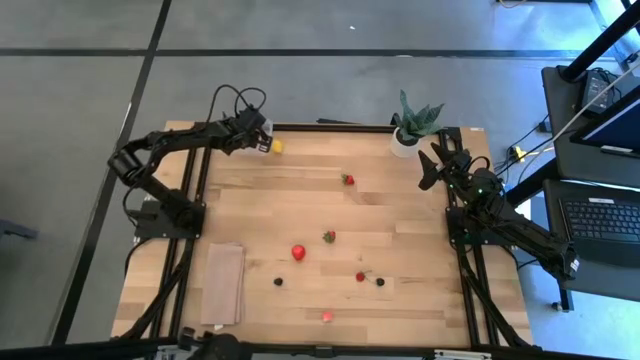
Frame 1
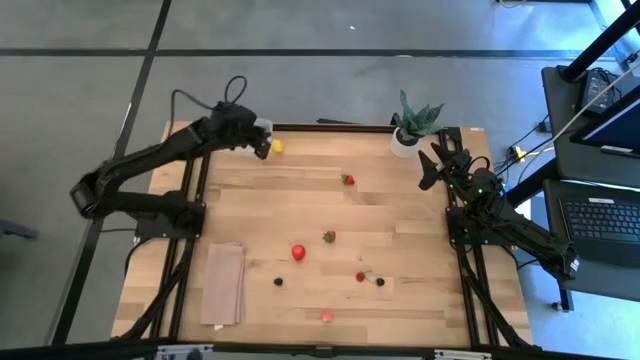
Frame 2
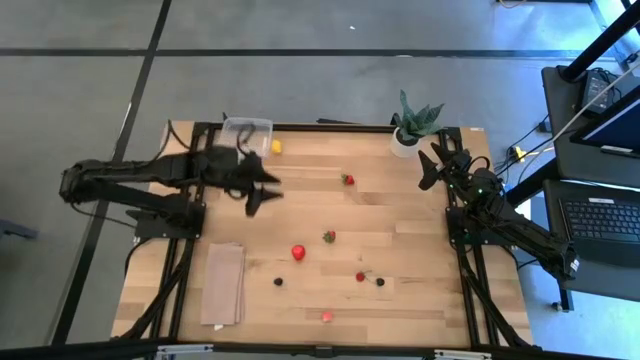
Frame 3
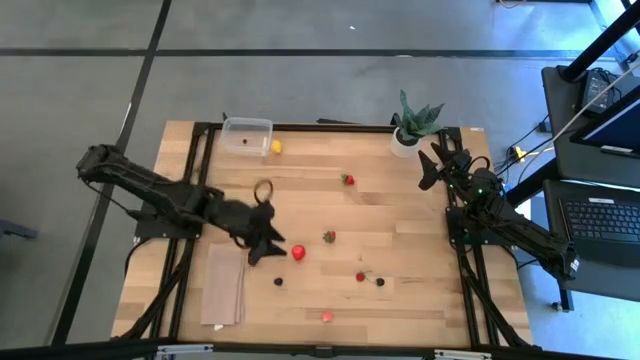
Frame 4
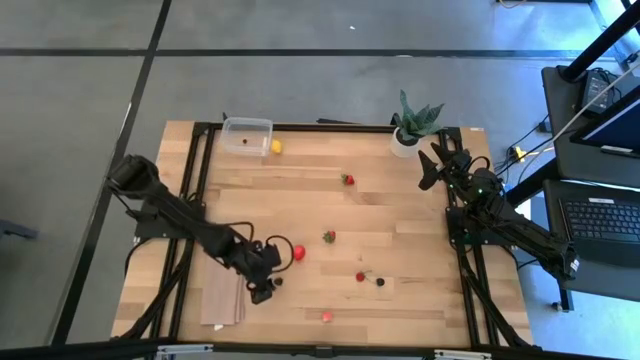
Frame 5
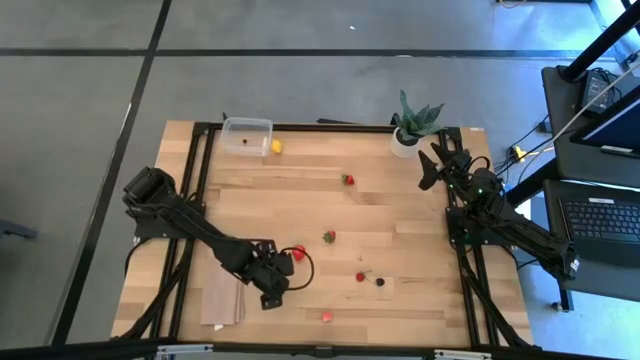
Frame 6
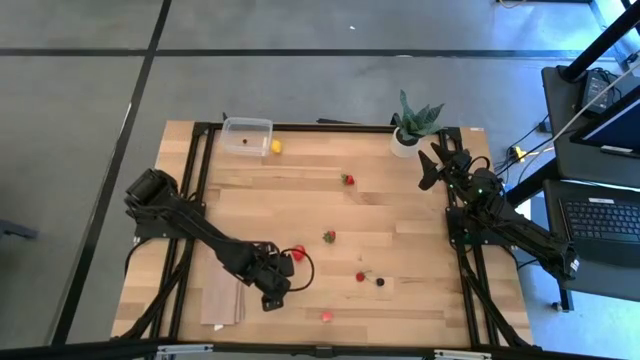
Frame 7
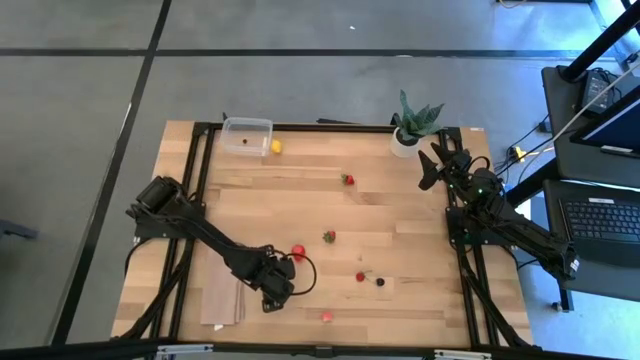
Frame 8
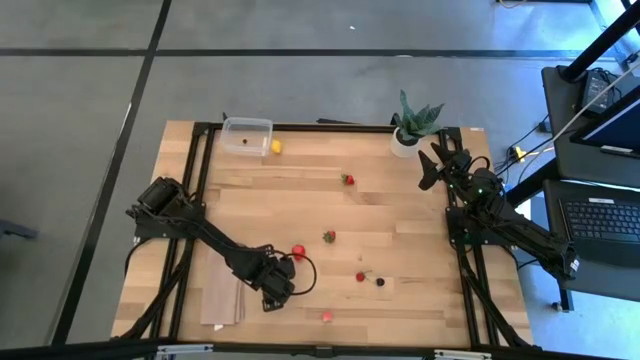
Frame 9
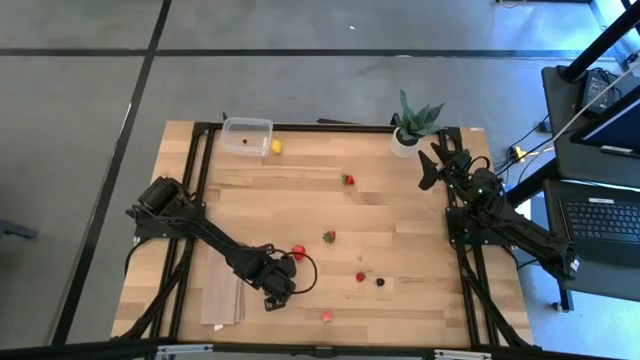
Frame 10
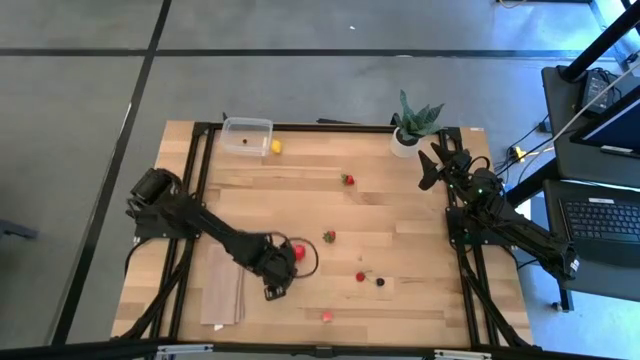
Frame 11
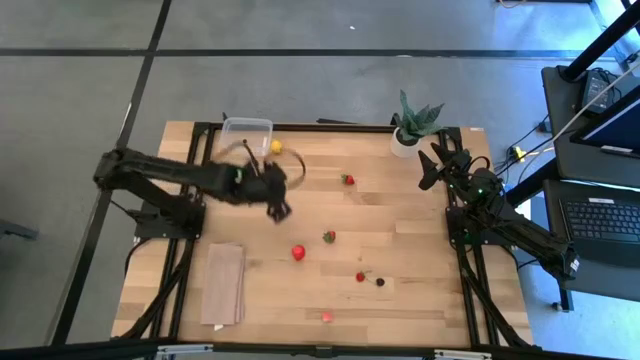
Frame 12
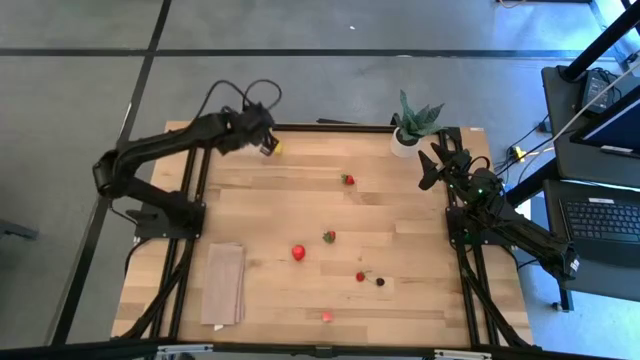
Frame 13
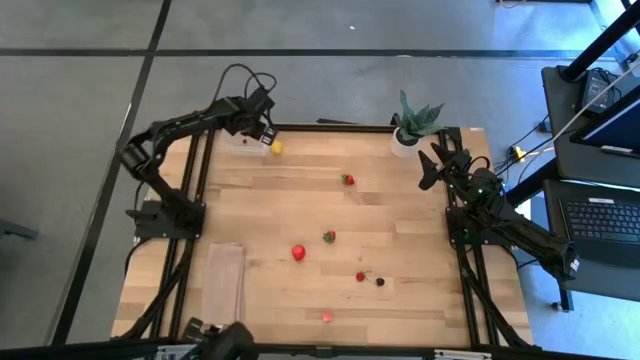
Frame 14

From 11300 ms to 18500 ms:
Task: Pick and placing Produce into tupperware
Put the blackberry into the transparent container

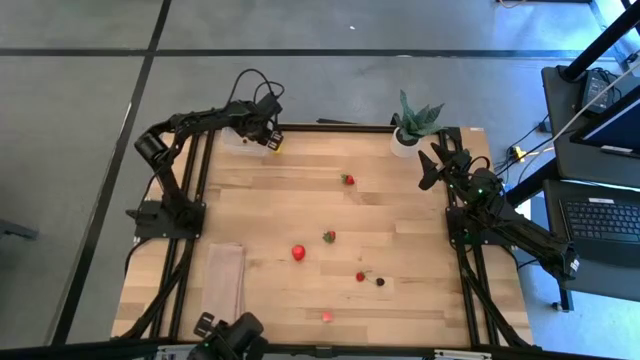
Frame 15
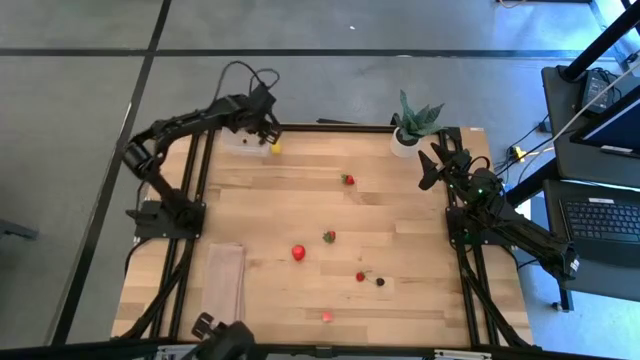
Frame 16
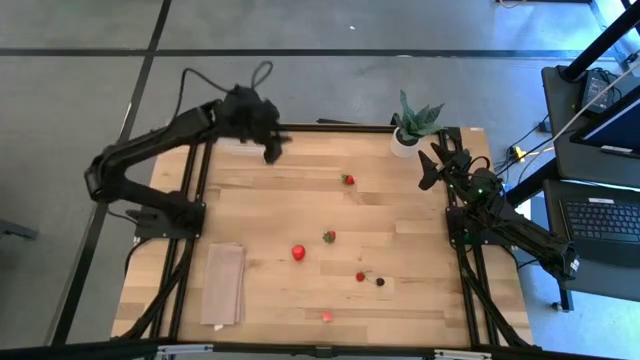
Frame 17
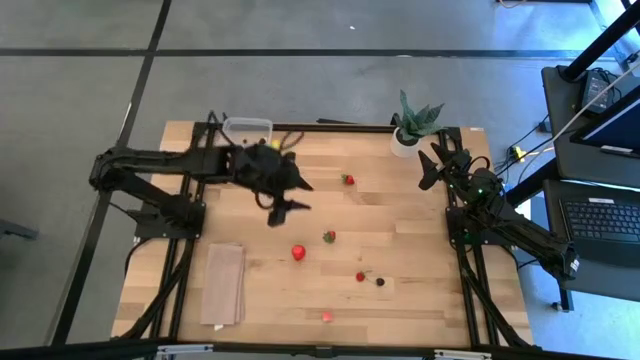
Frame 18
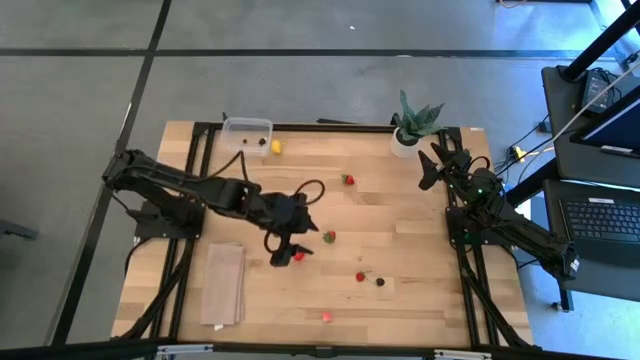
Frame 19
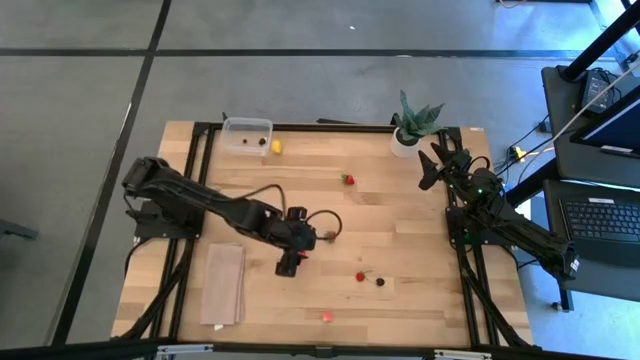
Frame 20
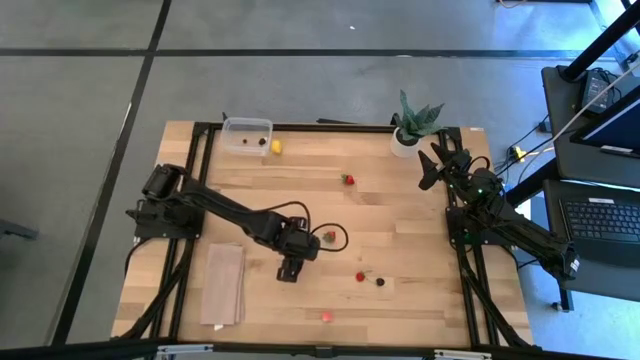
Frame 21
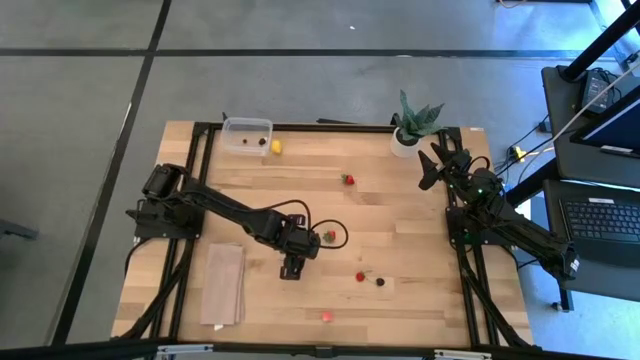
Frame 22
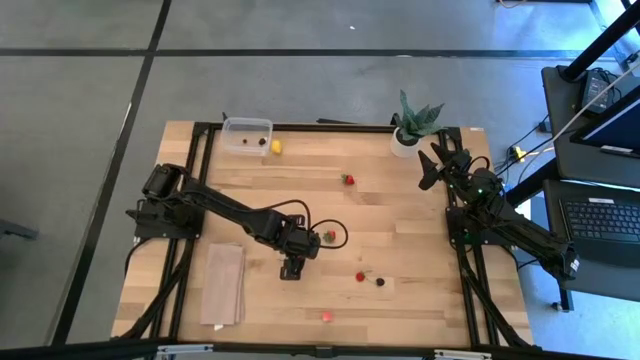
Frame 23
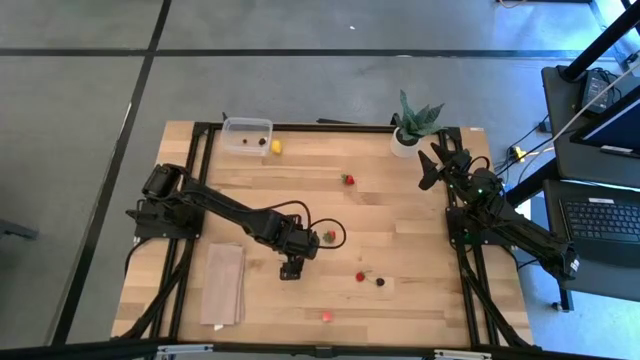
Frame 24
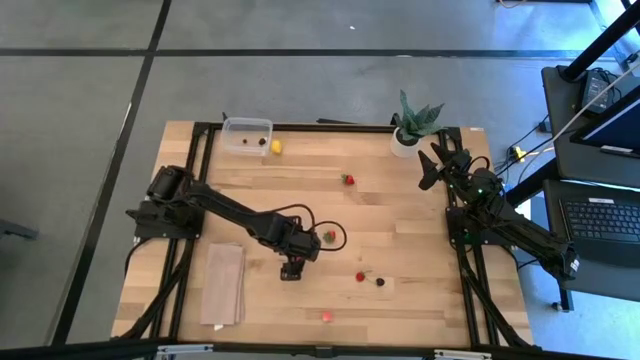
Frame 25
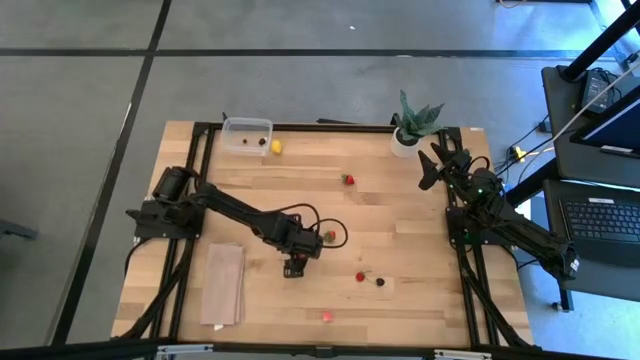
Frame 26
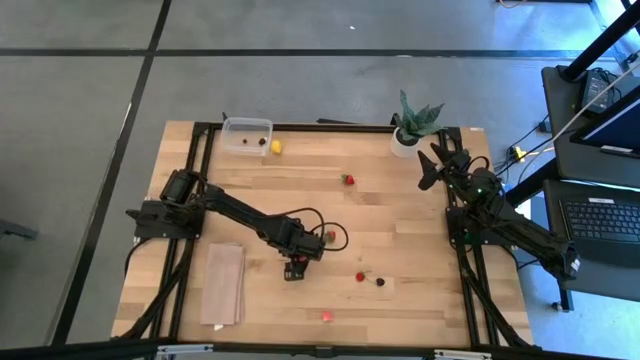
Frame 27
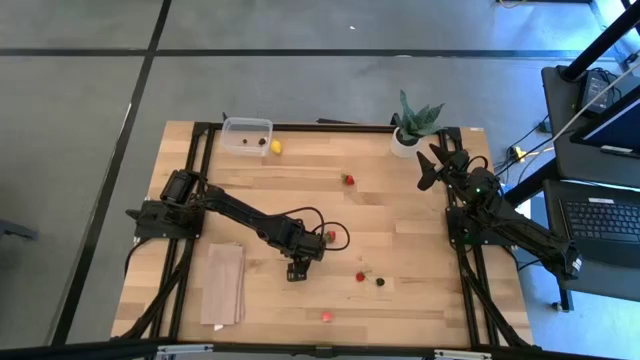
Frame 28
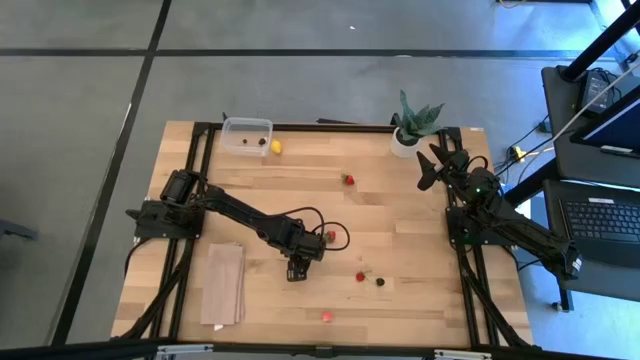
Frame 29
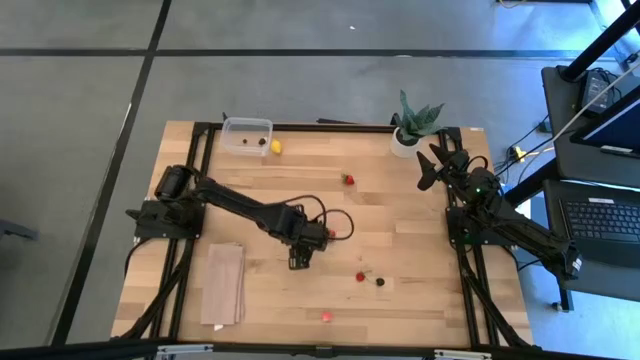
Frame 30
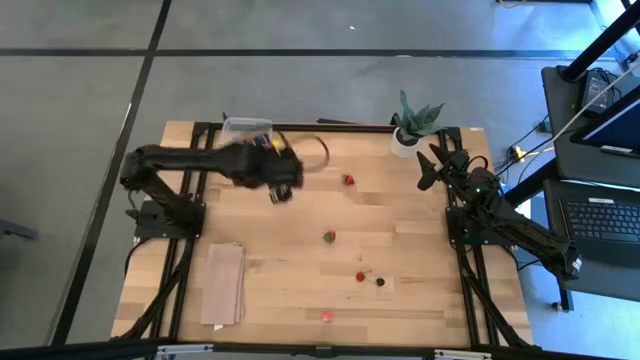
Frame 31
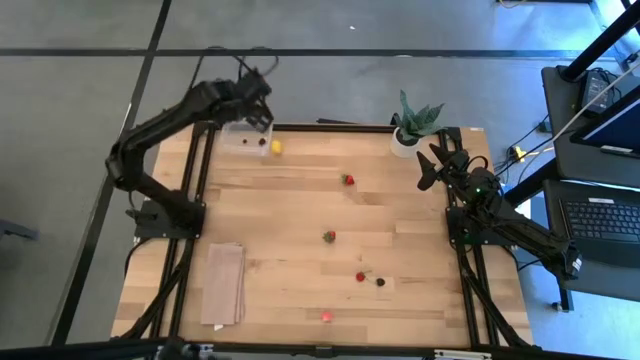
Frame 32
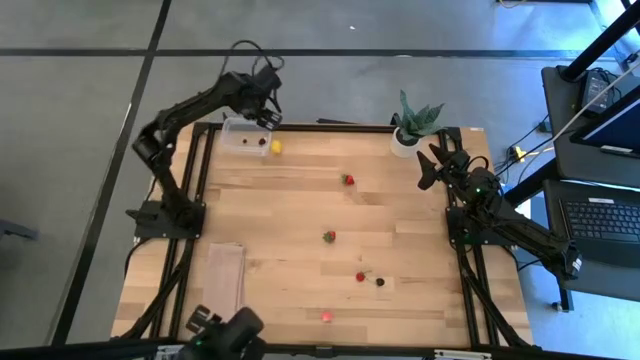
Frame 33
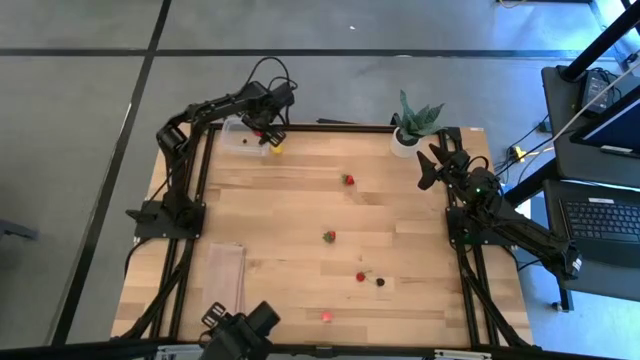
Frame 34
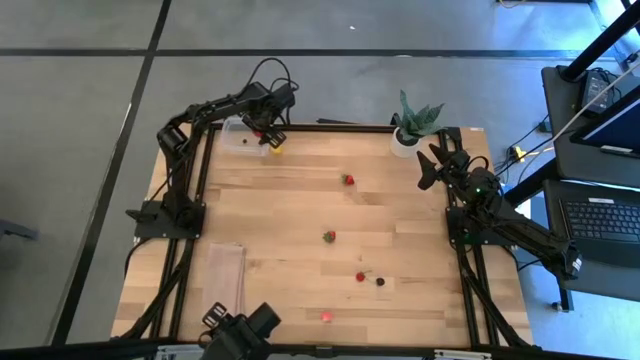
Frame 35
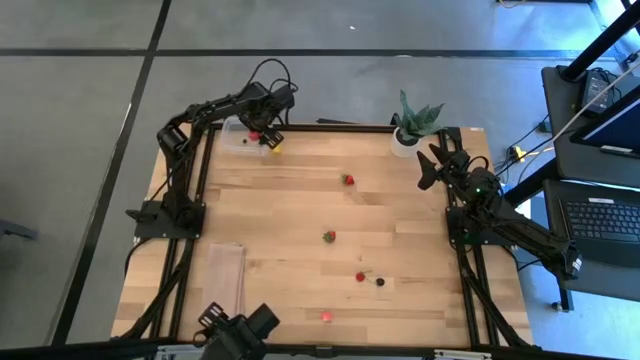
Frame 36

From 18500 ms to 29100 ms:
Put the red strawberry into the transparent container

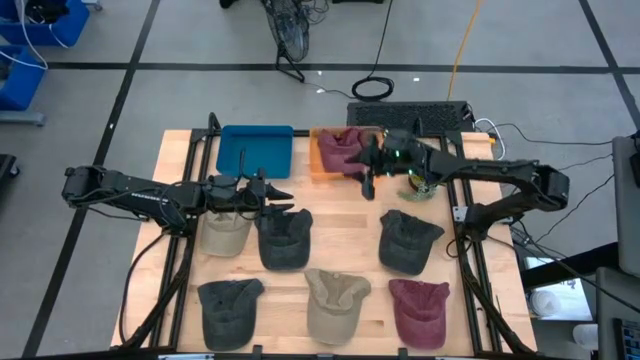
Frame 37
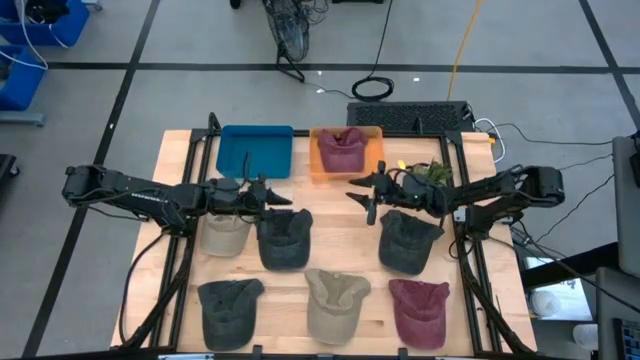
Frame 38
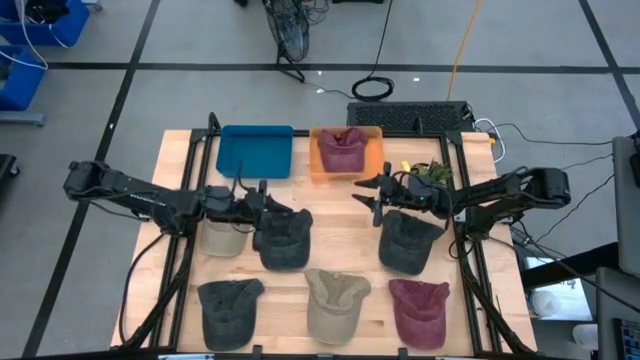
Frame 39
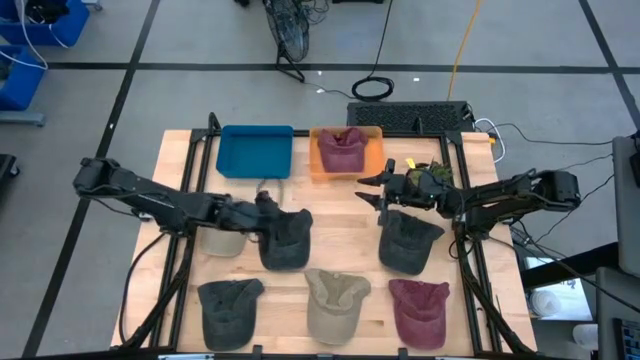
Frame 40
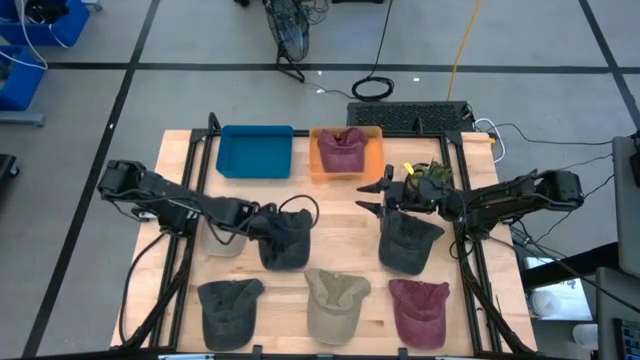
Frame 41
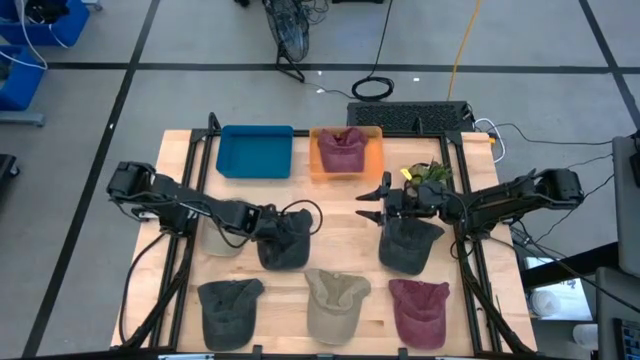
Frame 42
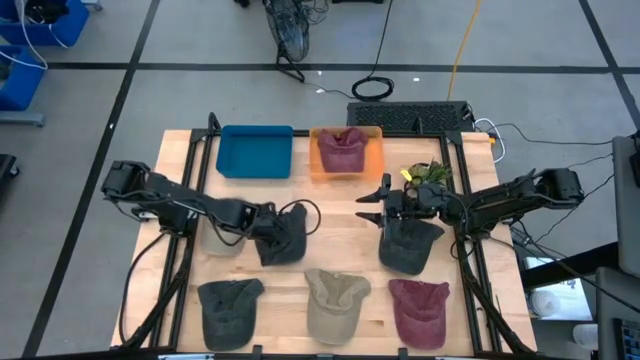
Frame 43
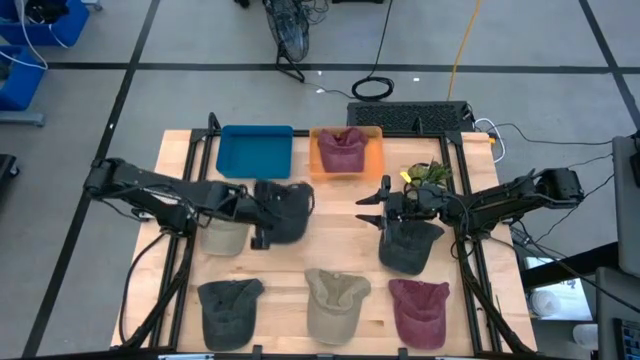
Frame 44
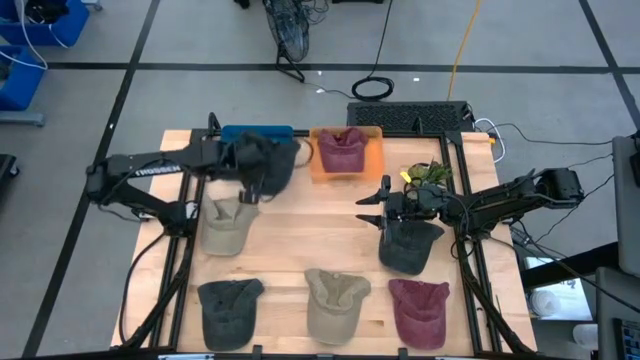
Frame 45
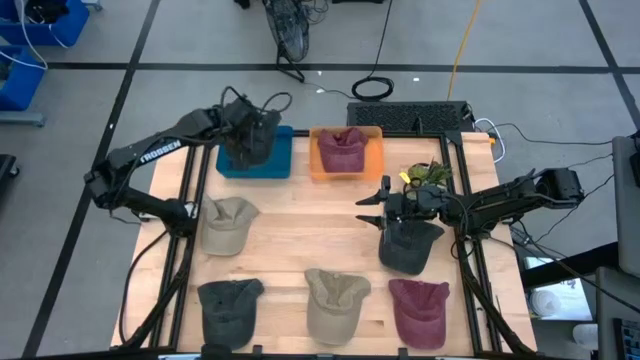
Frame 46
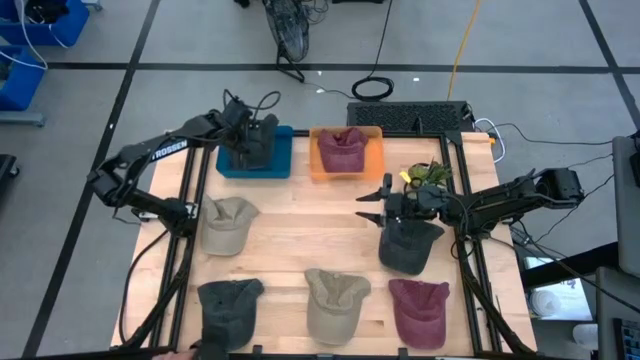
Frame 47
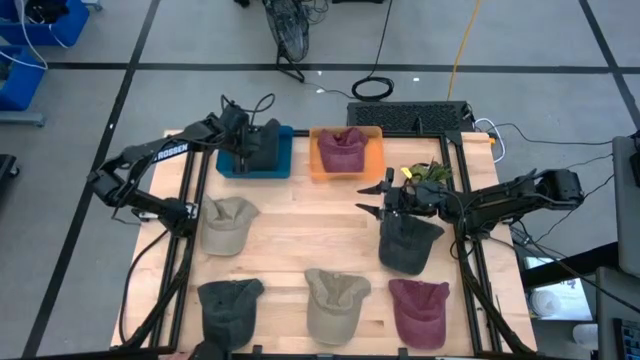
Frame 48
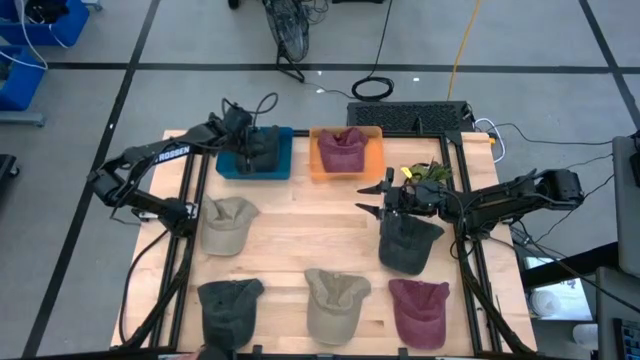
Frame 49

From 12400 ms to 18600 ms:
Task: Pick & Place hat
Put the top left black cap into the blue bin
